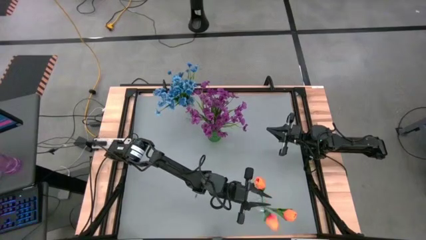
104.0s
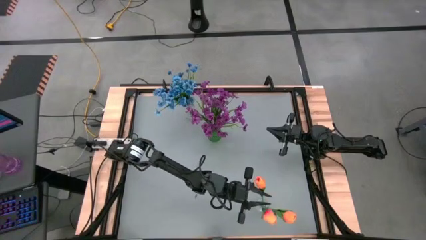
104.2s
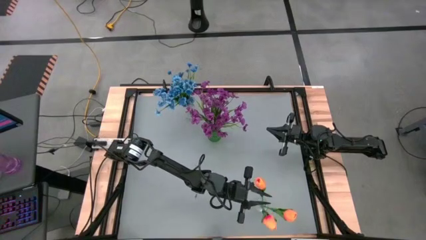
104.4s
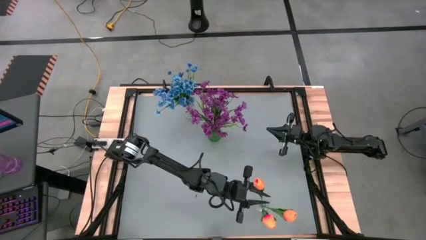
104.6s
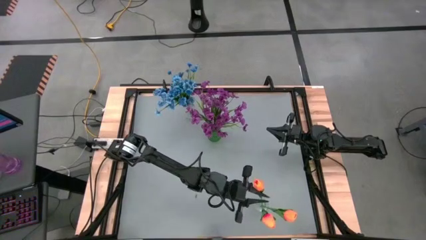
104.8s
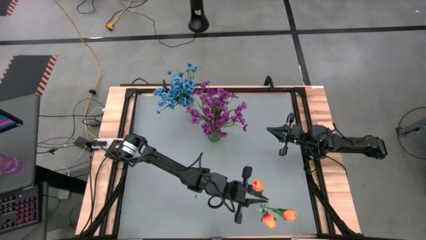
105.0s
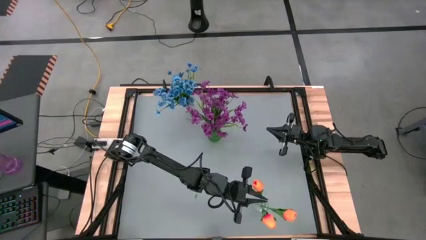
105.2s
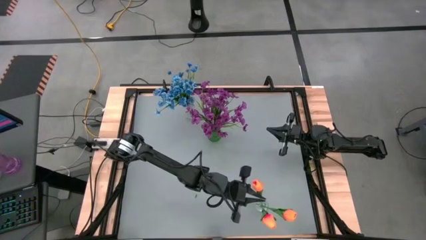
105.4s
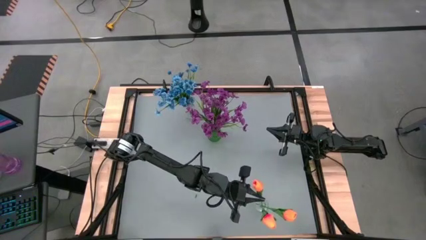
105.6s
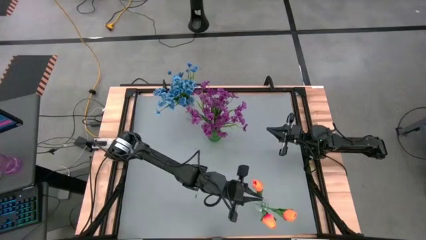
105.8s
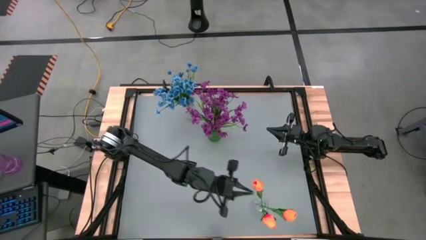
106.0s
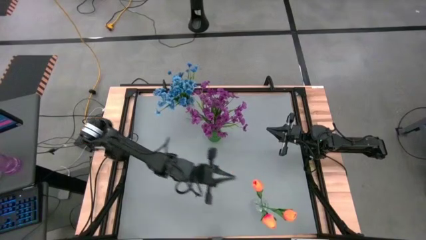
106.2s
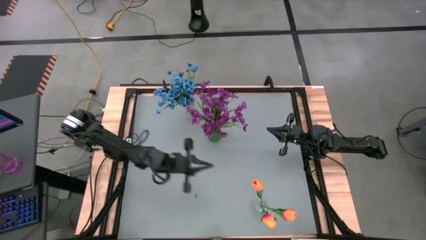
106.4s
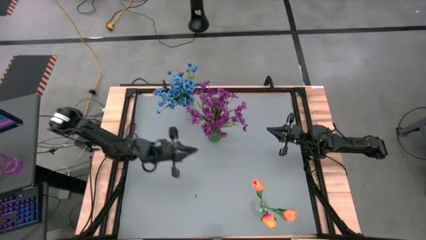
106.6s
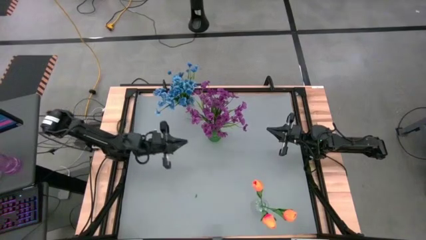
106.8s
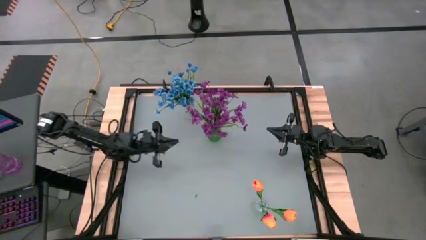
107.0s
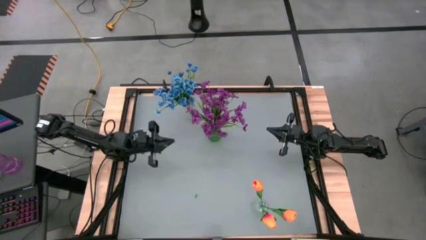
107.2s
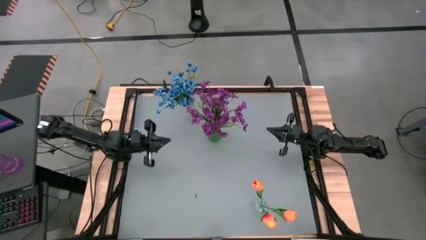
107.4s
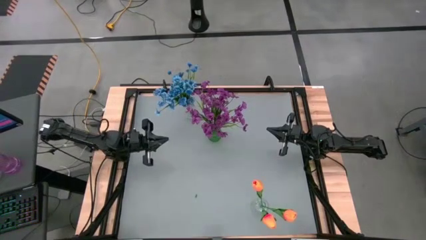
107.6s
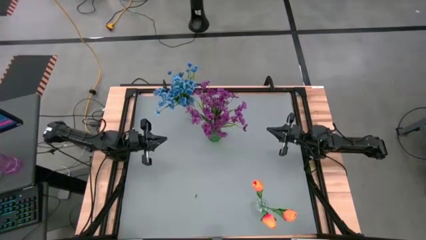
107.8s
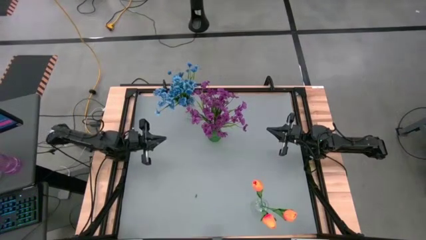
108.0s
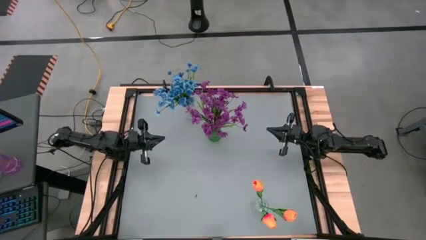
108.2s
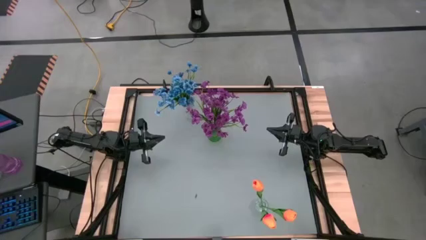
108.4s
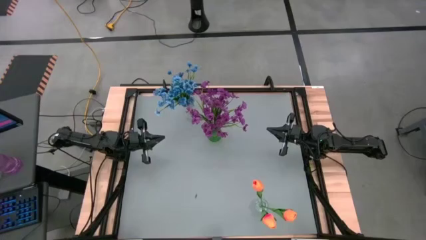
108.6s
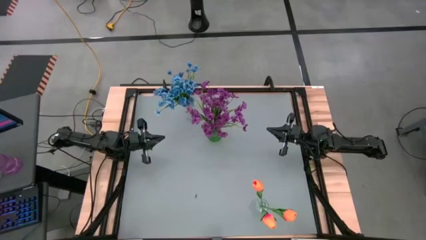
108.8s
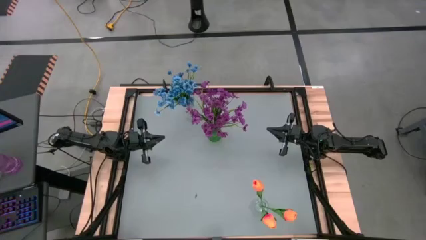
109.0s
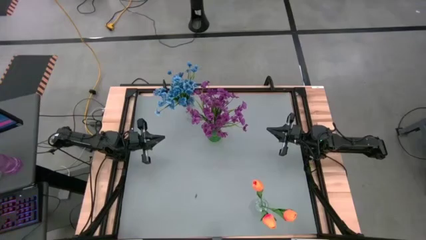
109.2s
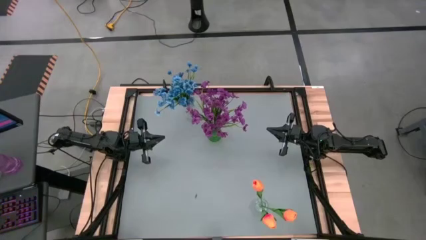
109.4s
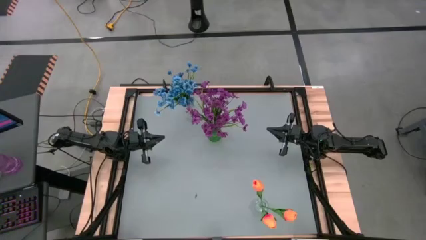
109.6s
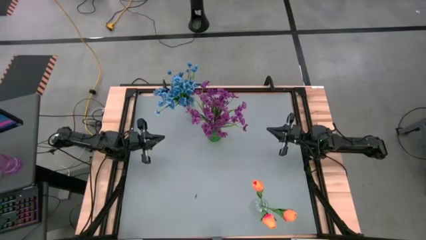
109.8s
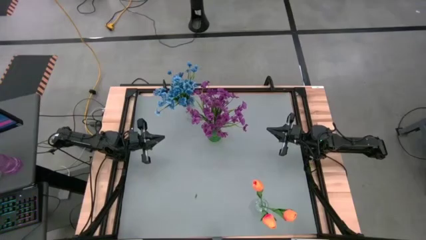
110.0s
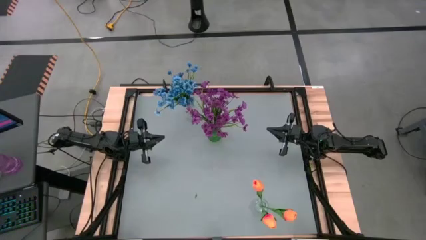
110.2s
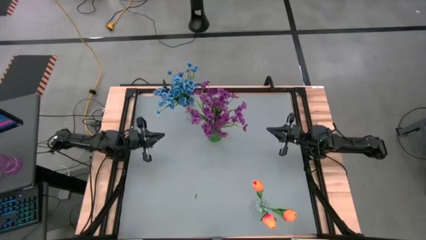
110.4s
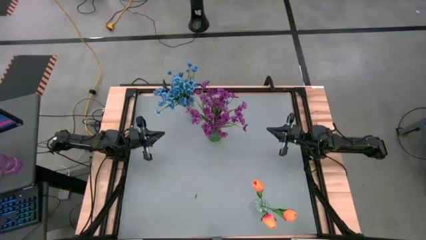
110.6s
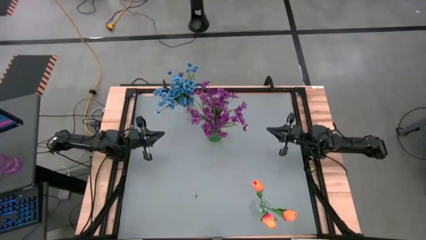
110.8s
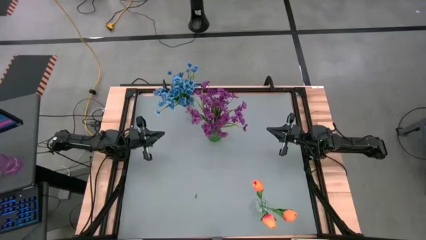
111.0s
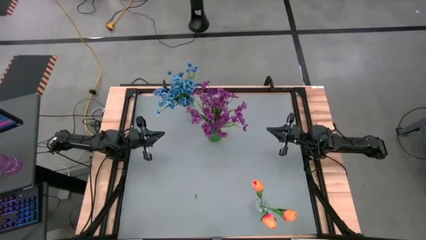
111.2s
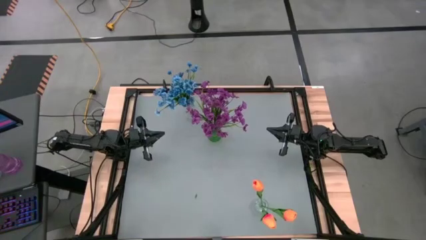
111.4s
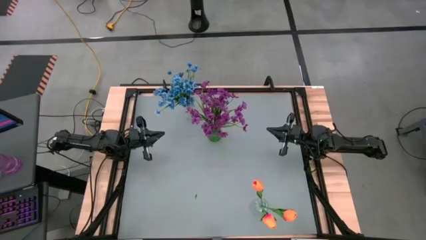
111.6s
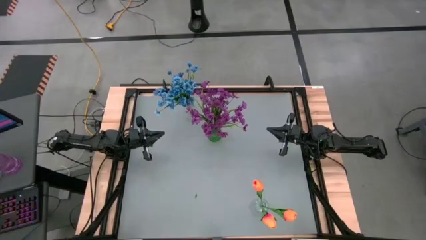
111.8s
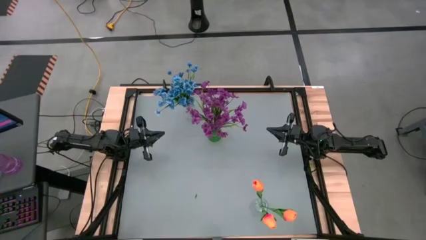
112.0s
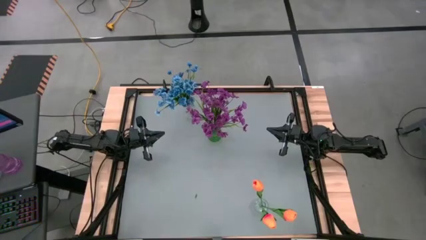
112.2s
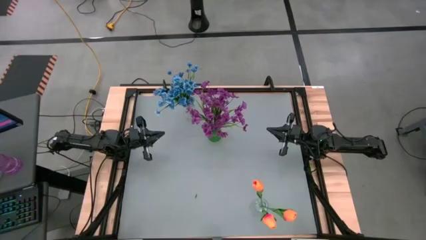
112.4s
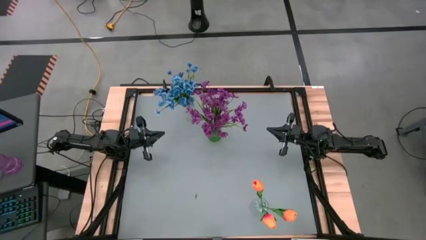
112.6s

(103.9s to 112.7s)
Task: Sort flowers into vase by color
Return to Home Position

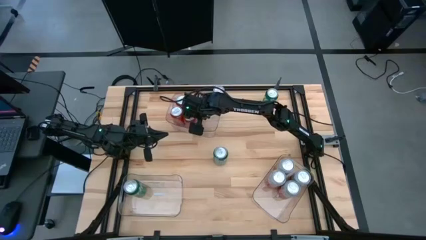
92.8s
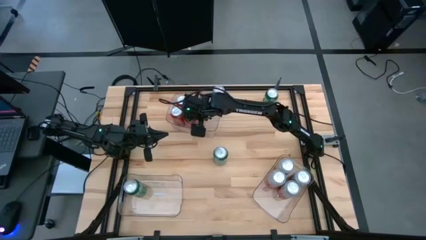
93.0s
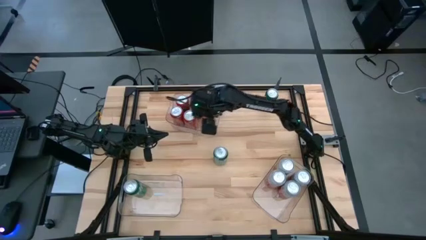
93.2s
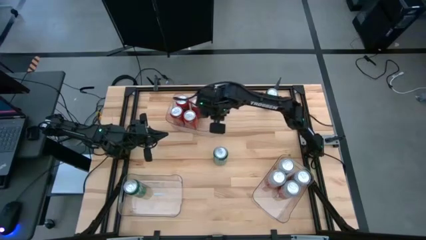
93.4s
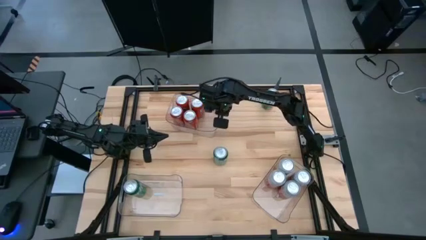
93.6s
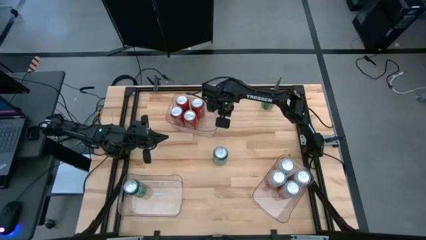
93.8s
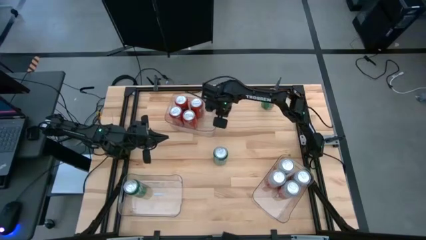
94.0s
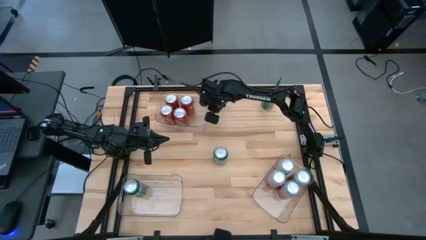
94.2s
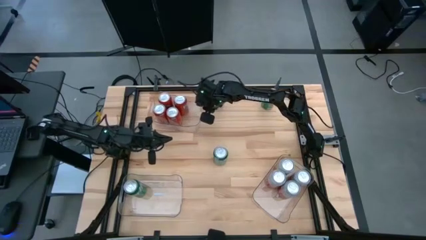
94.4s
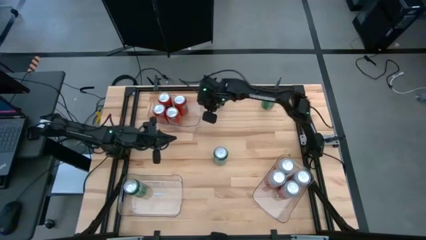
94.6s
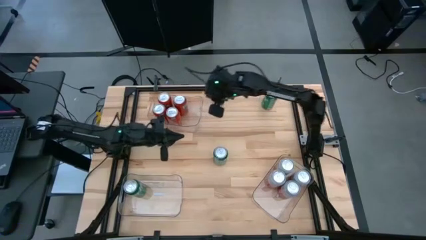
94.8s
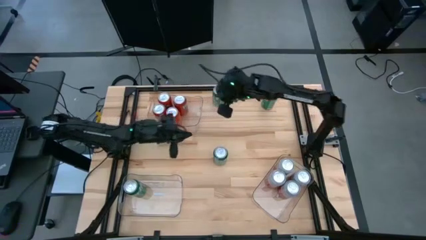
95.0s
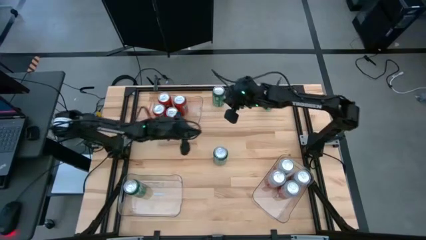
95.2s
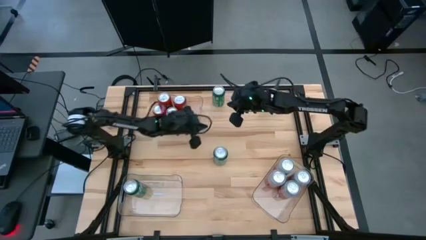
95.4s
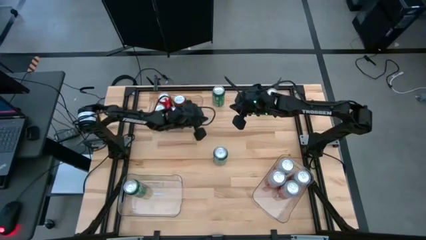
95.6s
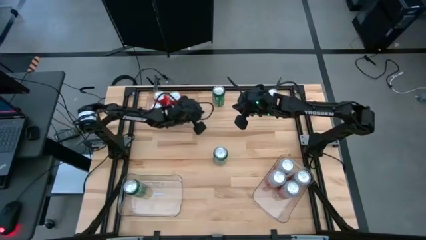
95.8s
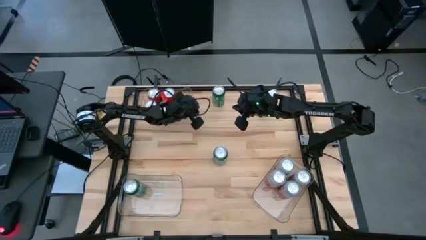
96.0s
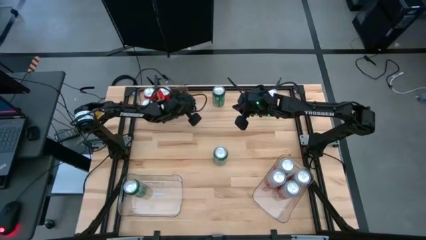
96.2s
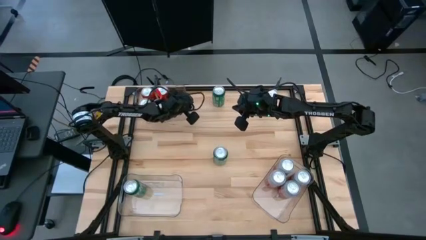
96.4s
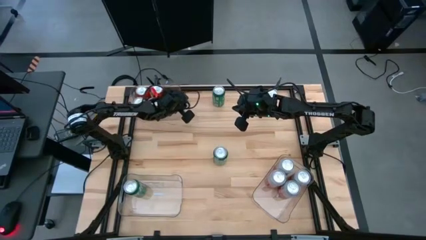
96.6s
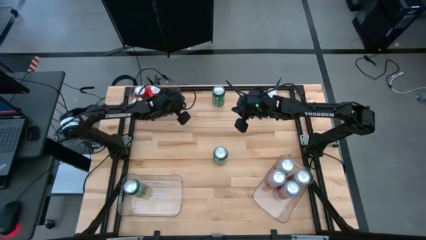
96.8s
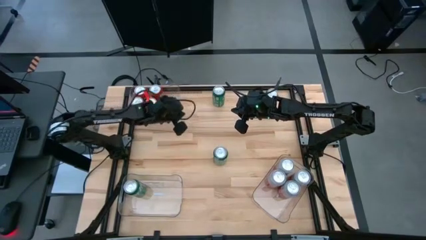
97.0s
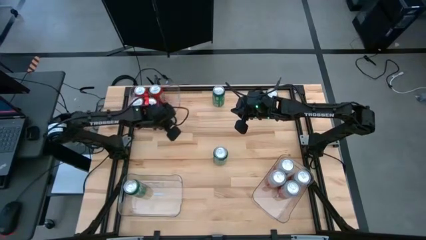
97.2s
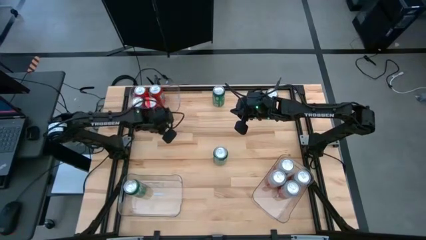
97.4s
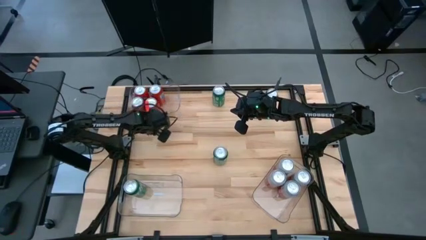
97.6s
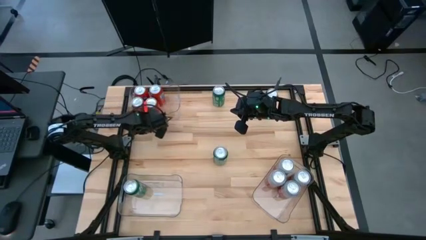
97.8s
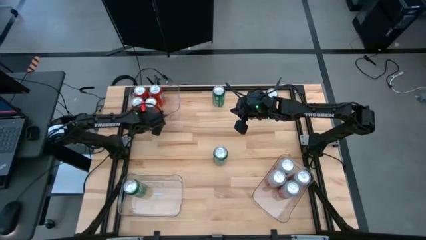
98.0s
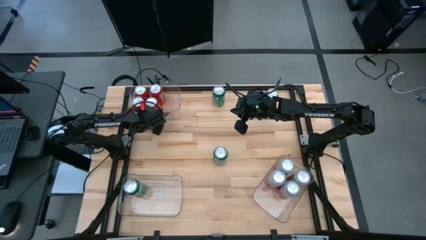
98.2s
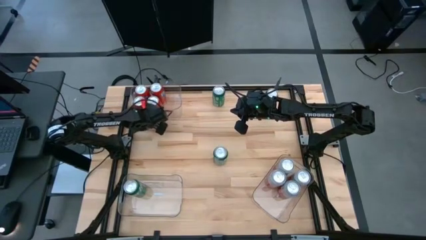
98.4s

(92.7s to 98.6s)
Task: Sort soda cans
Move the transparent bin with sorted red soda cans to the top left
